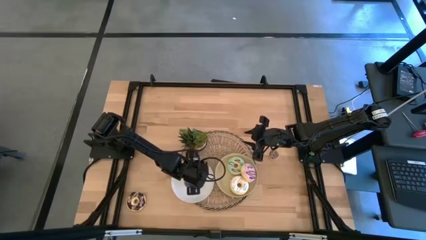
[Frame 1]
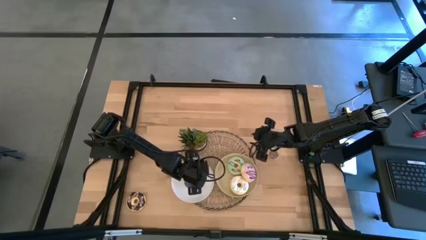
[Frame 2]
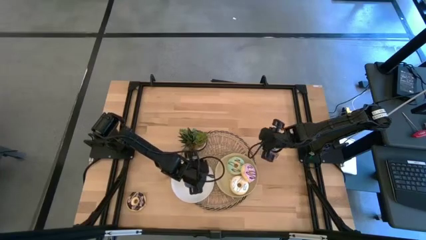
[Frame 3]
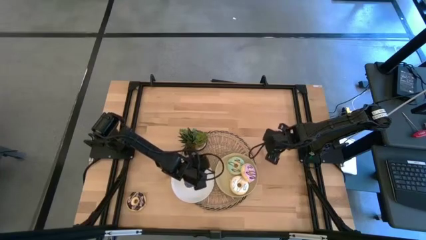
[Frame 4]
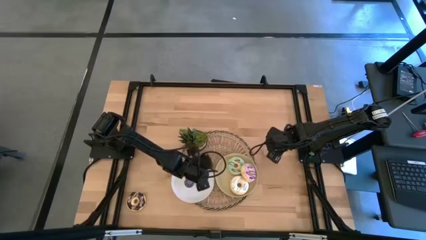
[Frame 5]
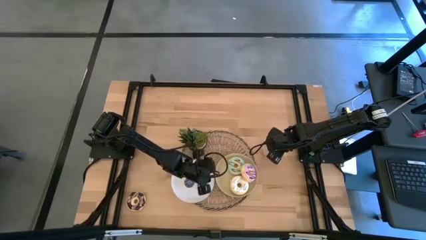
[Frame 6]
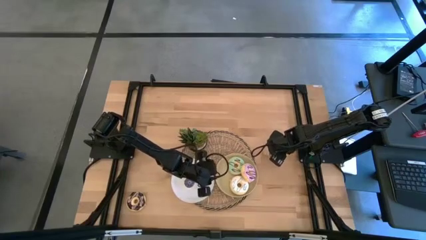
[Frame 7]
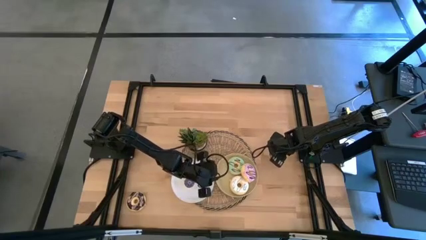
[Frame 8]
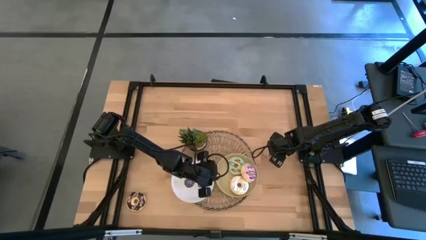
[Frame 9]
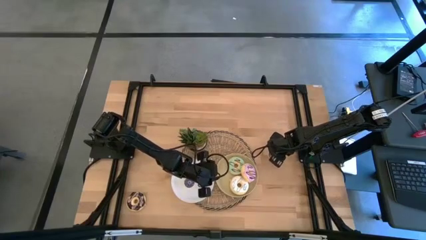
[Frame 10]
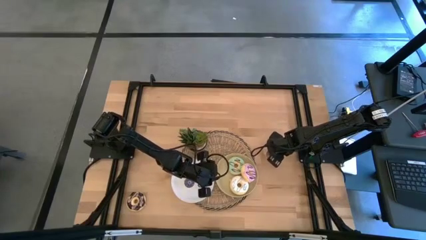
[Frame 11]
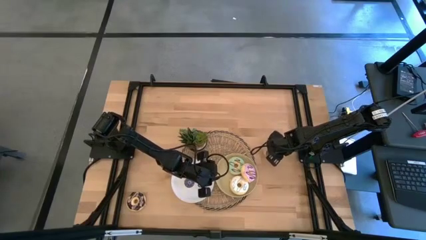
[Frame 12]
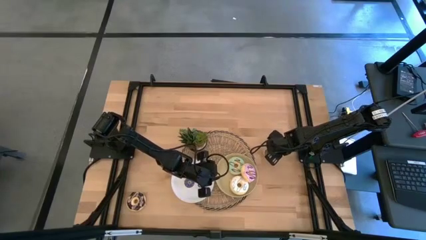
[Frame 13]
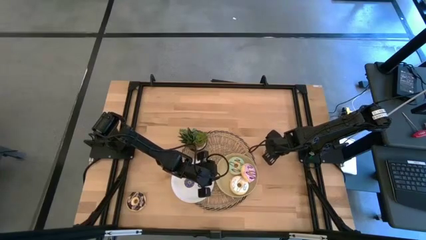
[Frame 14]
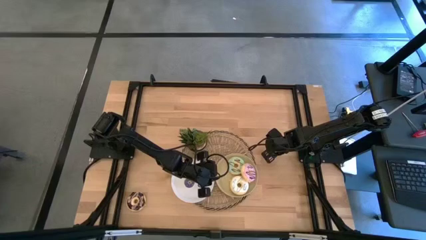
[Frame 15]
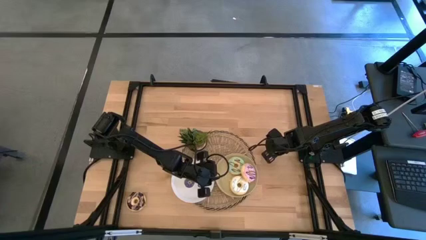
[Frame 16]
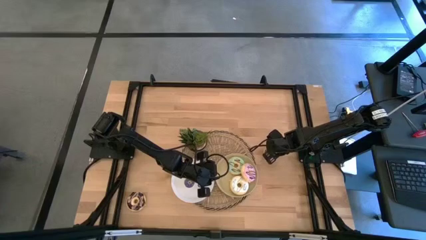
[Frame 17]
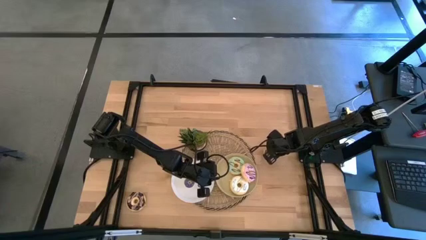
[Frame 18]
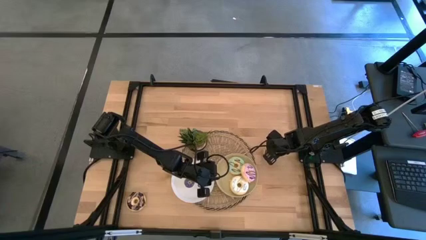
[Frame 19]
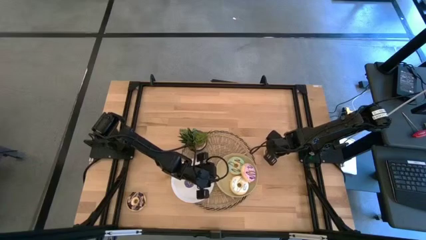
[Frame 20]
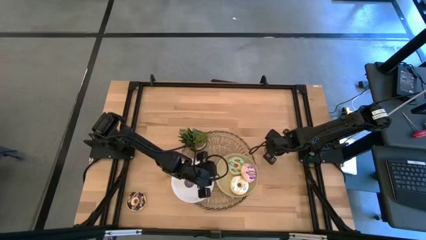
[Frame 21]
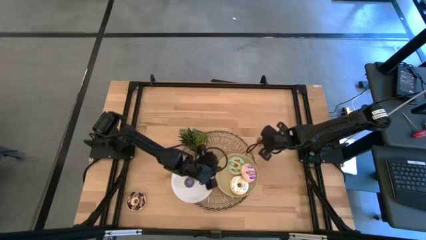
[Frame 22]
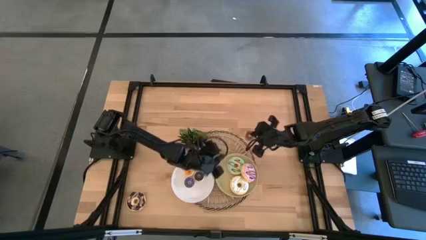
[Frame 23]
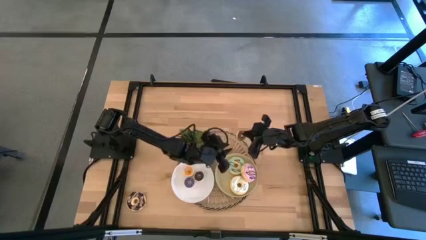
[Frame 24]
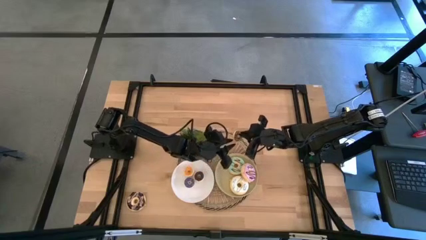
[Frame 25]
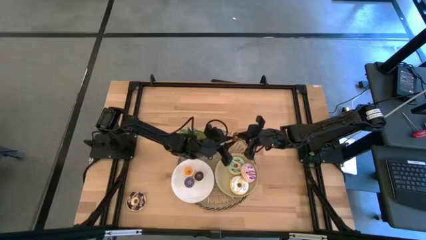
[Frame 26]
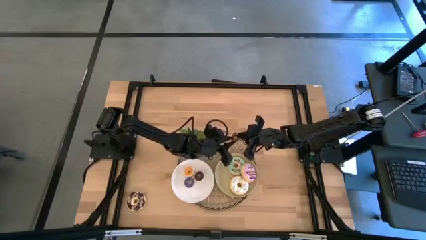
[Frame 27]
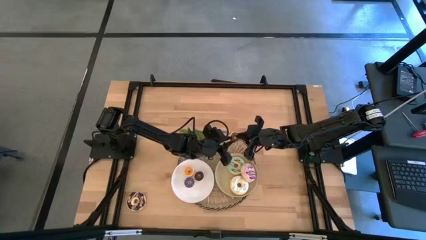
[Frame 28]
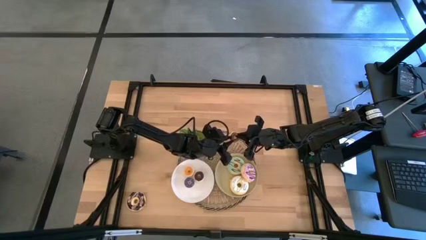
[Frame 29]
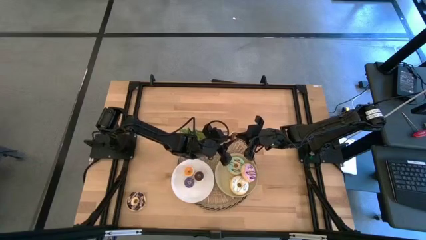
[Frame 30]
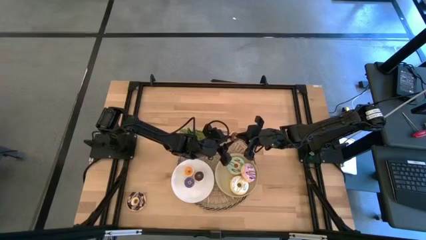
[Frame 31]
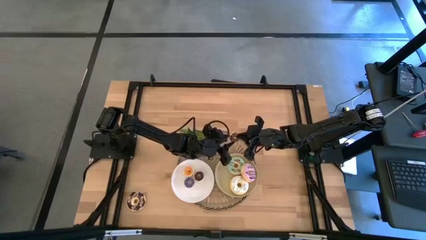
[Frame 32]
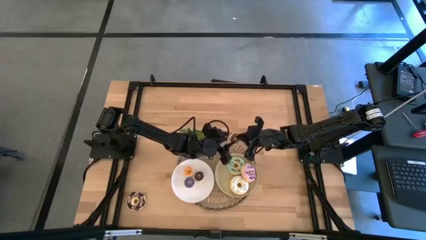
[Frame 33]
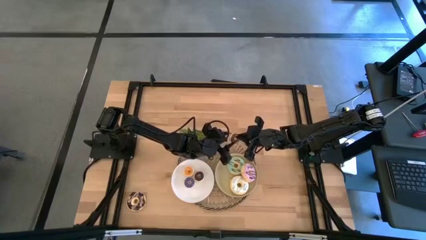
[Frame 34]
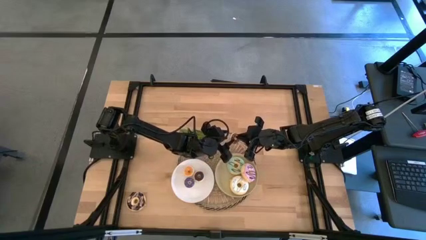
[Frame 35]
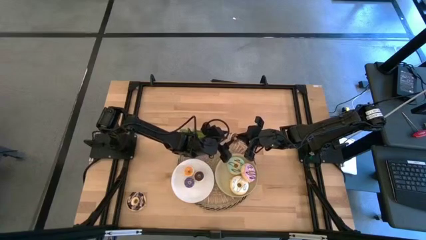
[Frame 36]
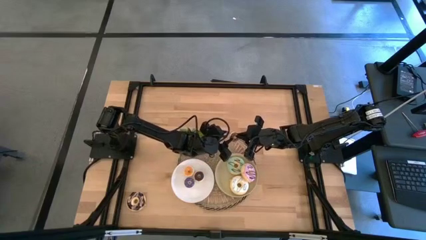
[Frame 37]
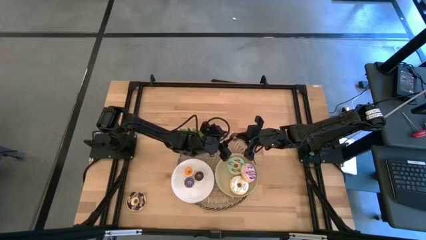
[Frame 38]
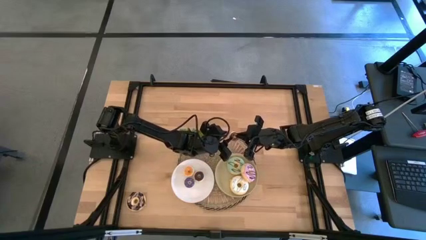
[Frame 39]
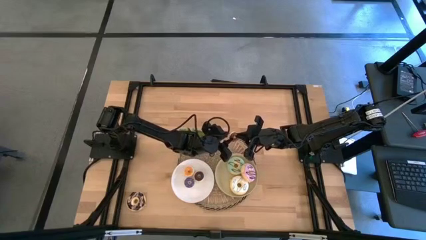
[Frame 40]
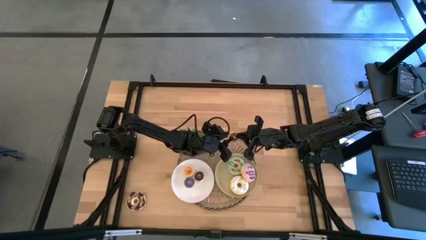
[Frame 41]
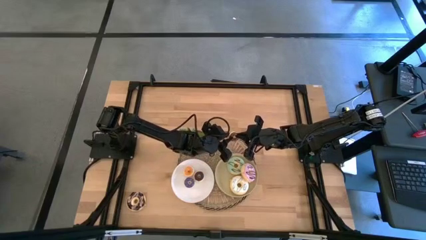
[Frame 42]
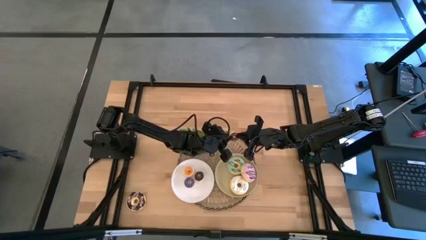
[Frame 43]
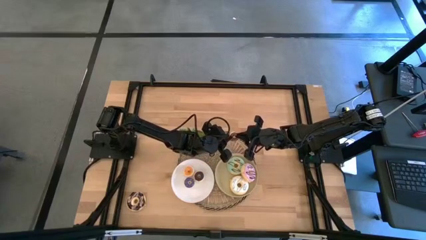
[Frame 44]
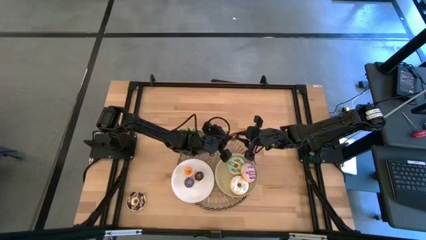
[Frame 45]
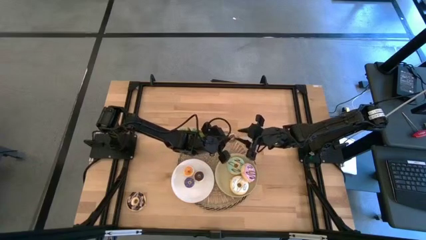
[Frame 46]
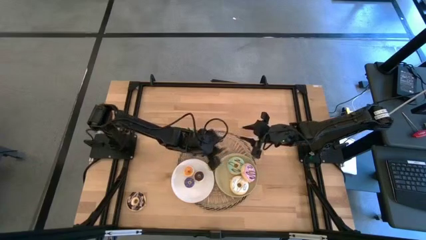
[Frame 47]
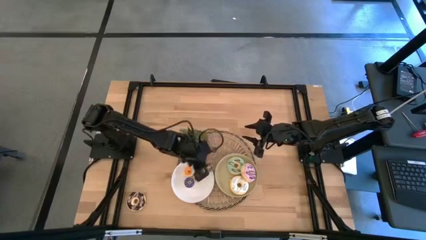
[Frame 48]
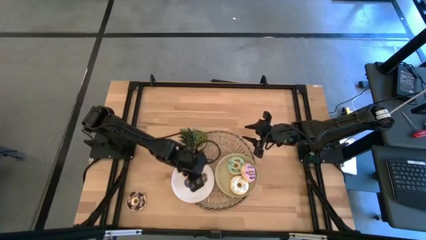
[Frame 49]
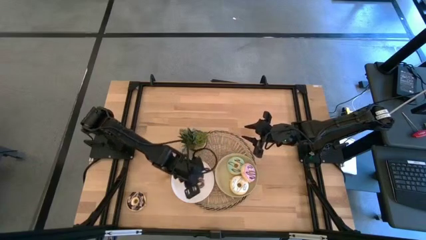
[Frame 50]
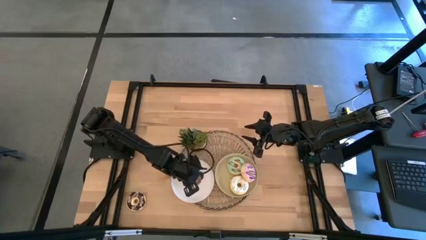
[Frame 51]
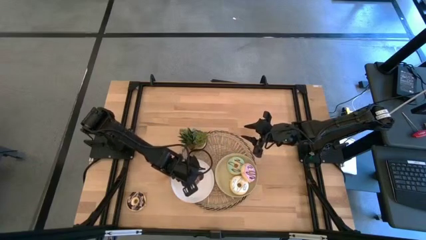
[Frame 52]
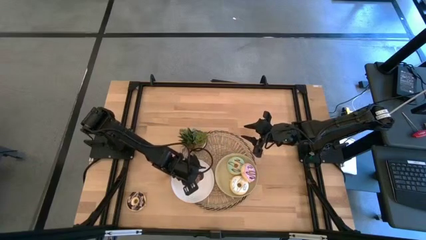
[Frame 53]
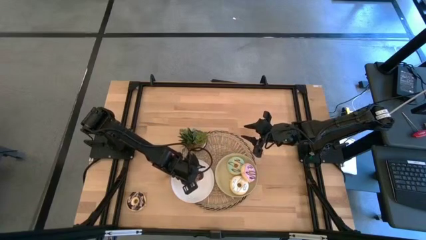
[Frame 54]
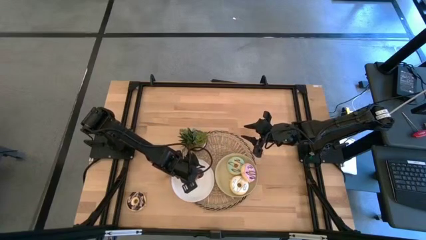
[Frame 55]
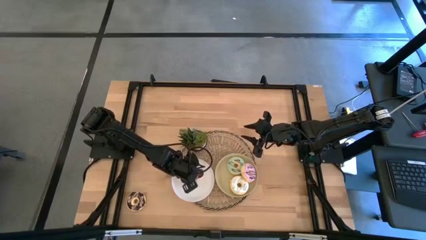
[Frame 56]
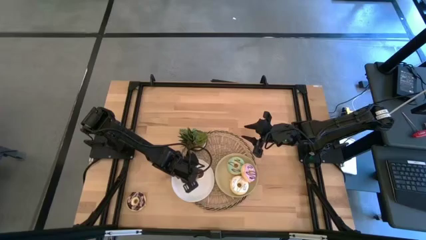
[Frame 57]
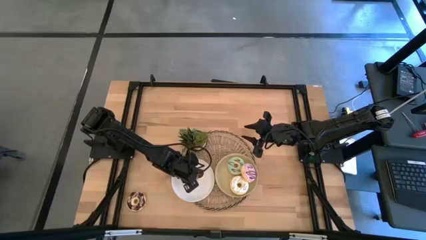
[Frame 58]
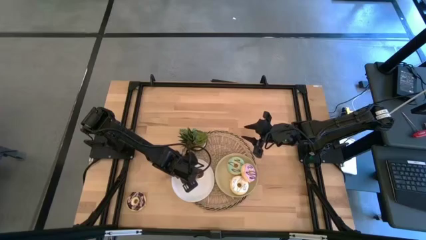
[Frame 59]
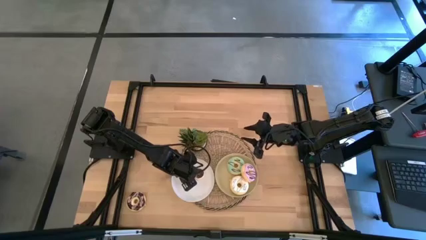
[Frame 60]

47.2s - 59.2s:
Task: Pick & Place donuts
Put the small brown donut on the white plate
